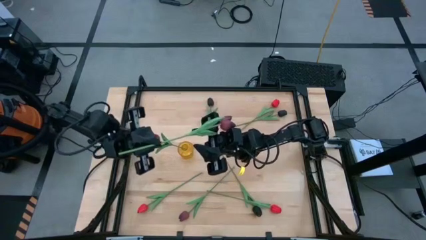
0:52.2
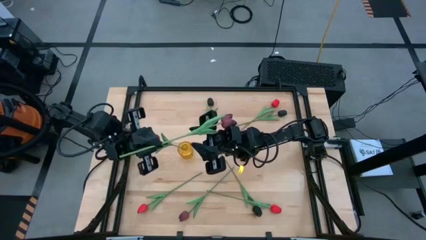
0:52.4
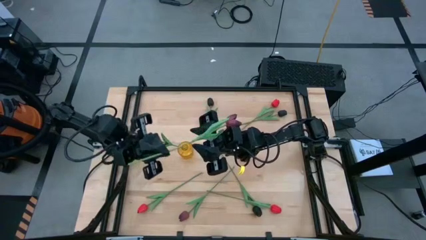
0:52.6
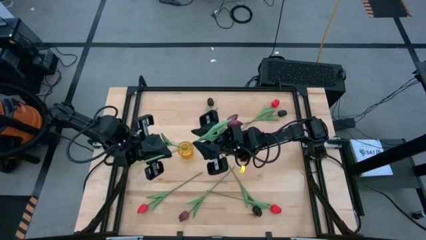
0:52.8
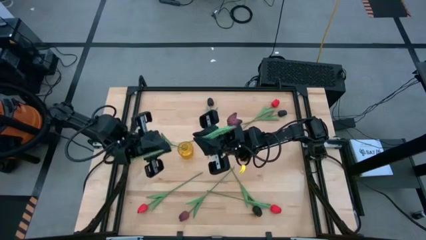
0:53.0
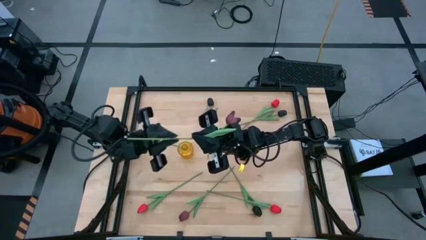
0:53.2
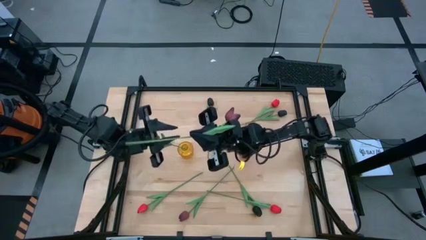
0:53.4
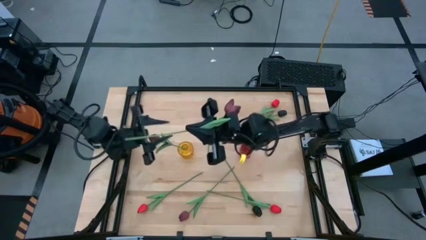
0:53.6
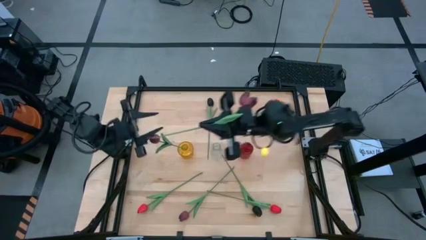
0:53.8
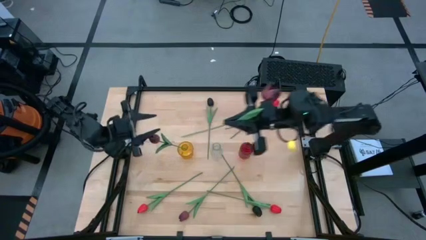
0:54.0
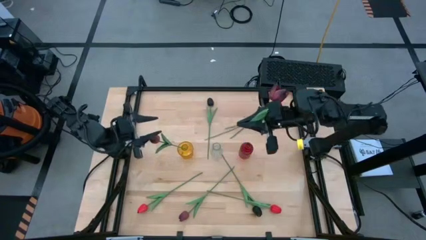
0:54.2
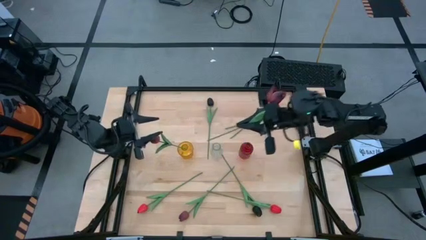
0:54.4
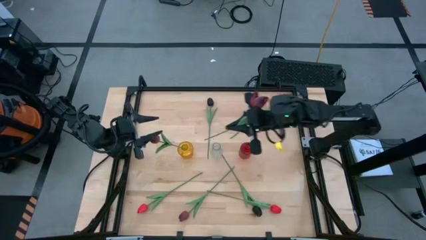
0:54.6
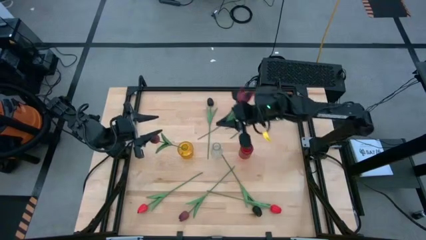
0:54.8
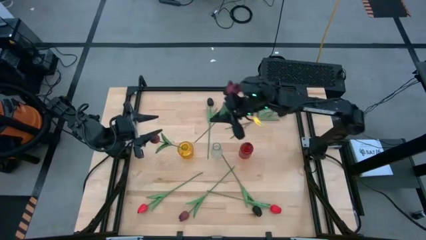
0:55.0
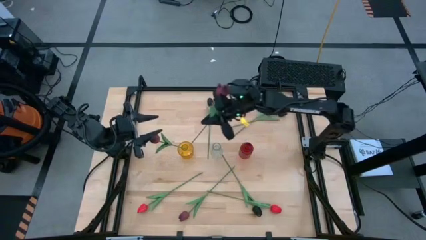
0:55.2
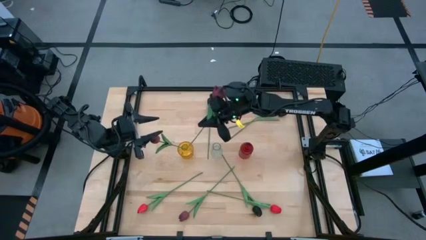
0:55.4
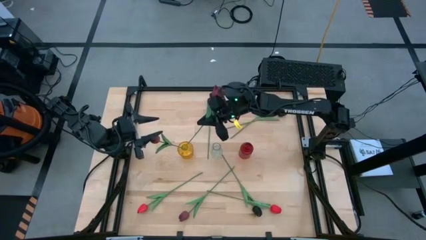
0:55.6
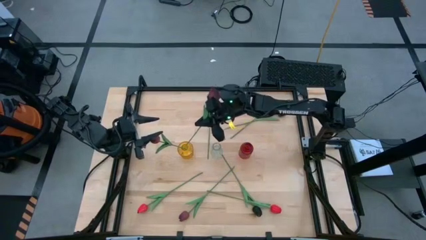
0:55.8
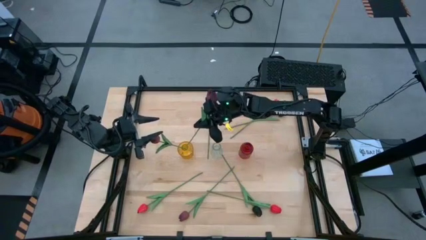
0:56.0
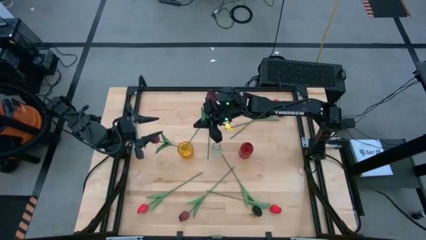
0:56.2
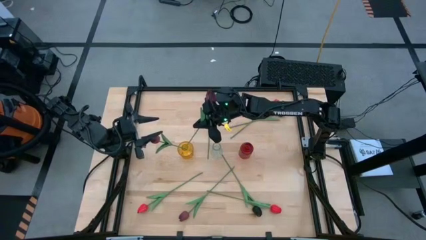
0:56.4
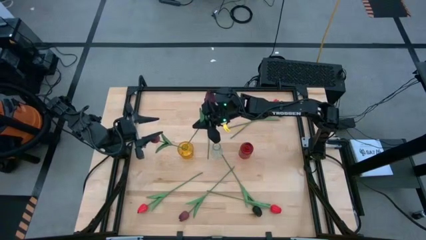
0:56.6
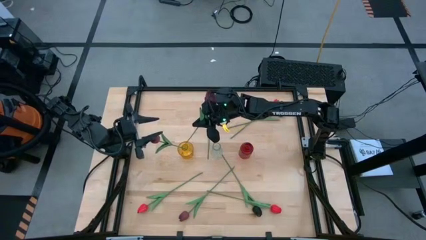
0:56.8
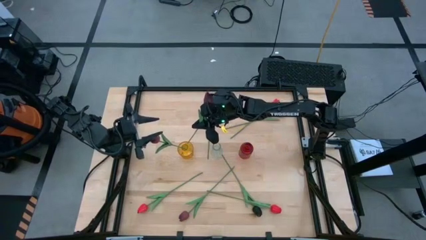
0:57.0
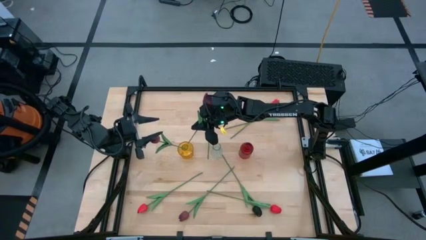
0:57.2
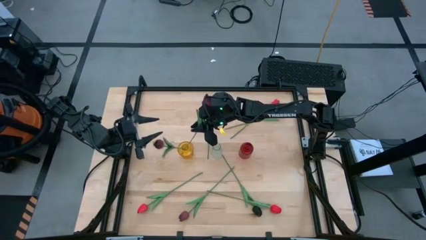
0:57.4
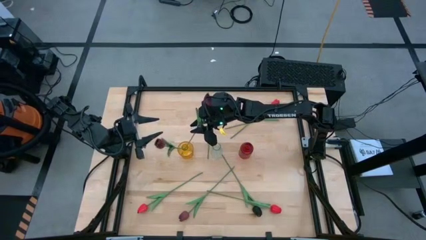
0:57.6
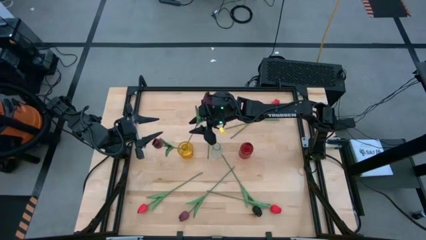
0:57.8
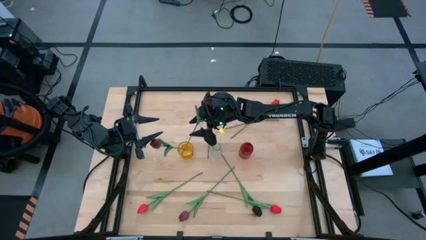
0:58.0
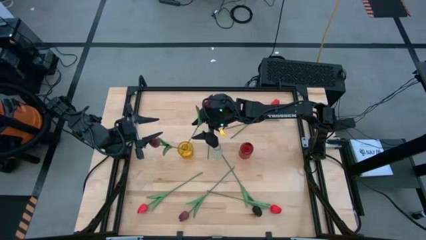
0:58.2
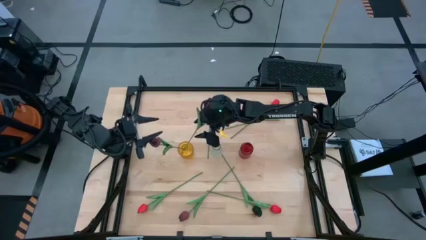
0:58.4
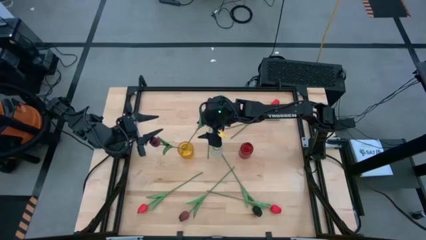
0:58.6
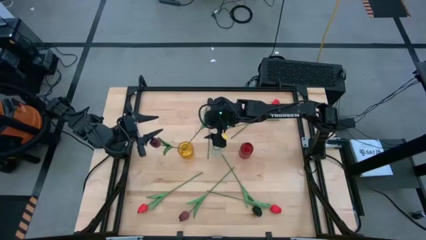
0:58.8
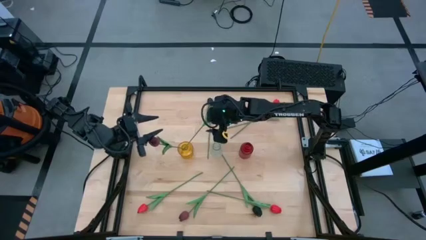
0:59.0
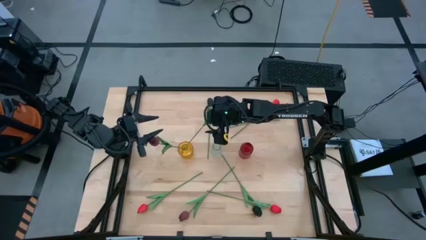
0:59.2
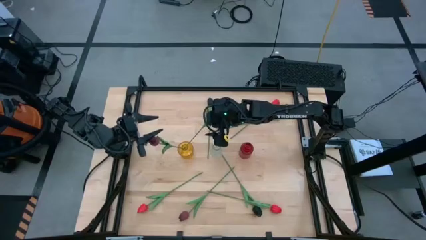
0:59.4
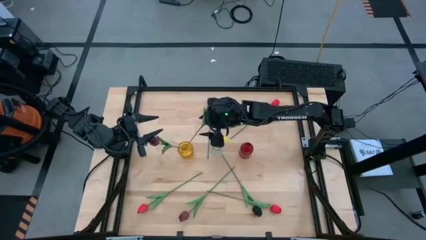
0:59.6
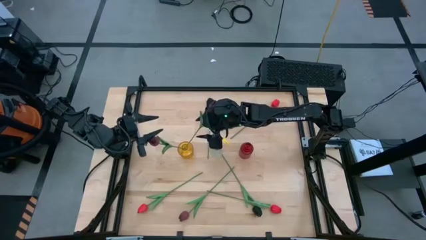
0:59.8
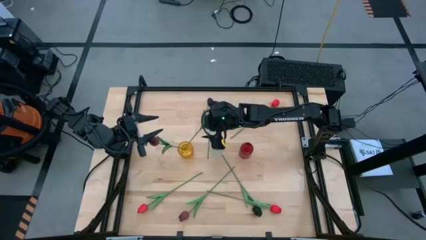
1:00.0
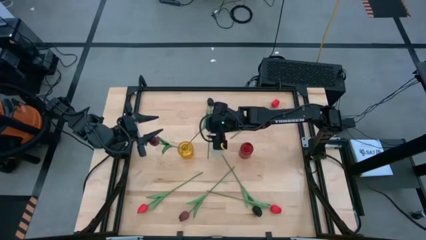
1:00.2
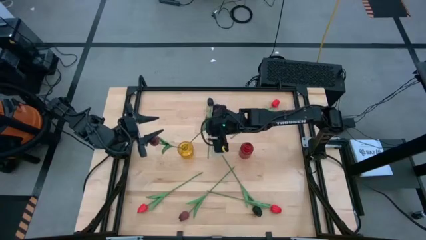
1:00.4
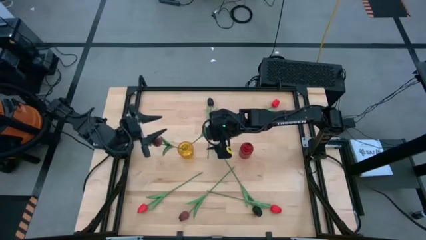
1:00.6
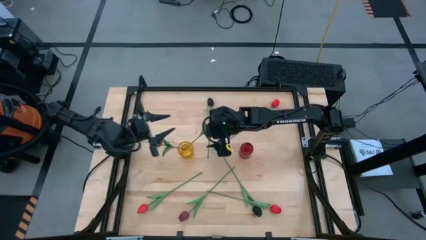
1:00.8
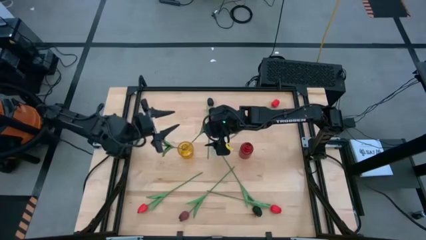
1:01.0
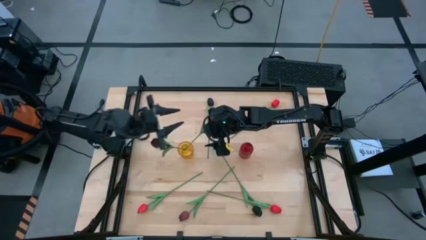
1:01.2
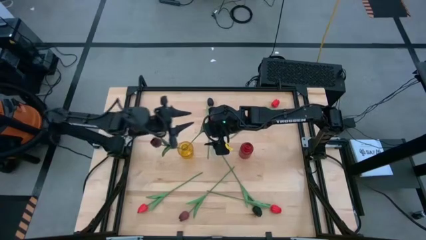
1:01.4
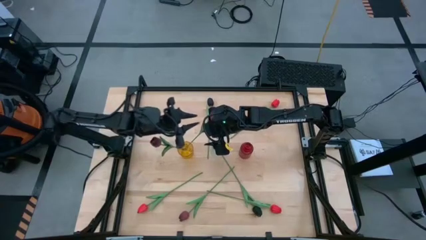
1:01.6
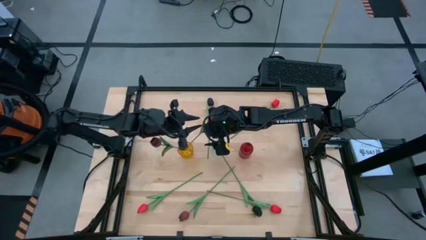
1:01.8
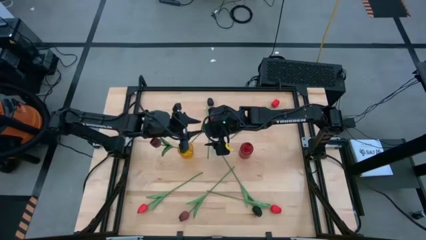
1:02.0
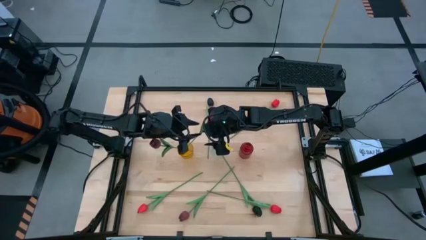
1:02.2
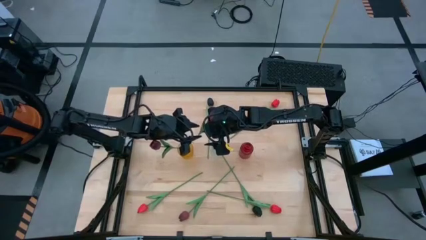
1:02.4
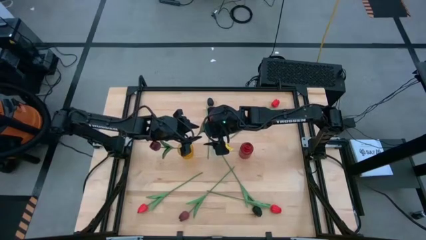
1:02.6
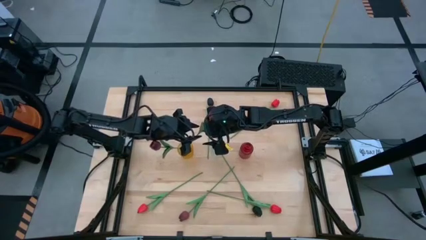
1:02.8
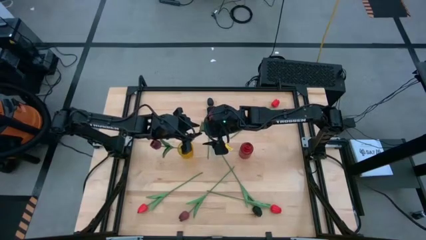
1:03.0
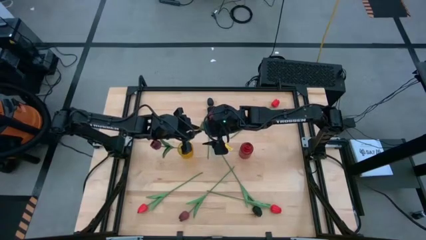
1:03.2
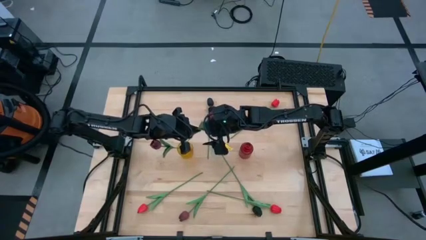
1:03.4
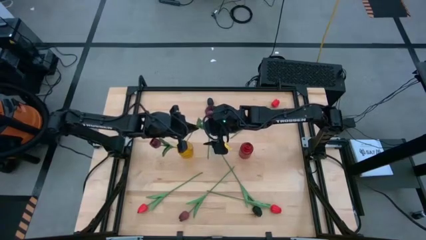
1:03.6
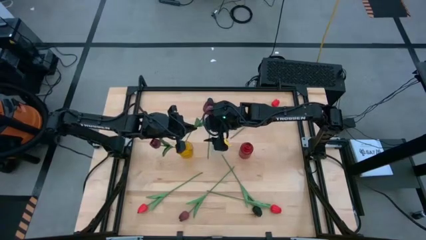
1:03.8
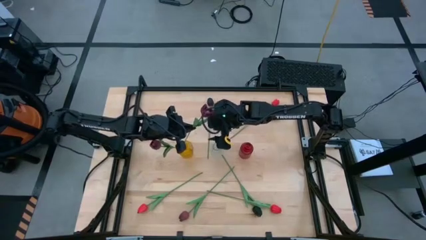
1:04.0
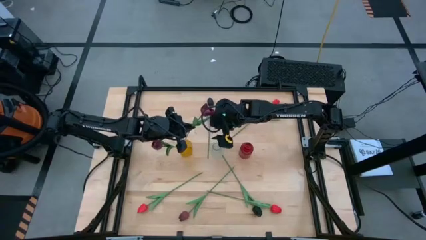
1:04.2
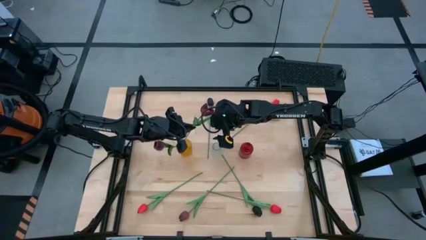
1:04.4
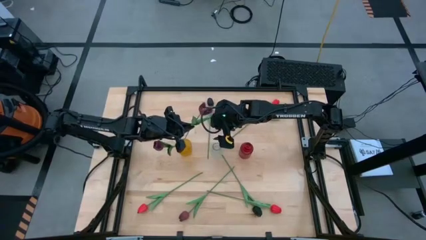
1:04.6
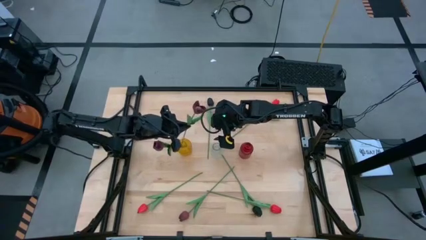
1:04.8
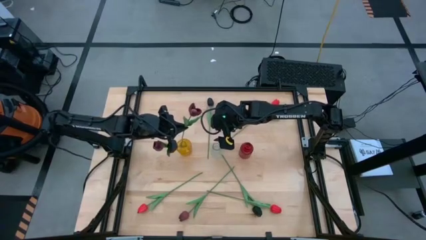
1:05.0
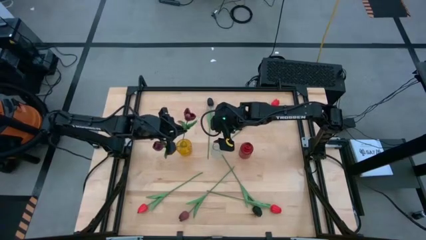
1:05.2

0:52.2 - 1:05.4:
Task: Sort flowers into vase by color
Put the top red tulip into the yellow vase
